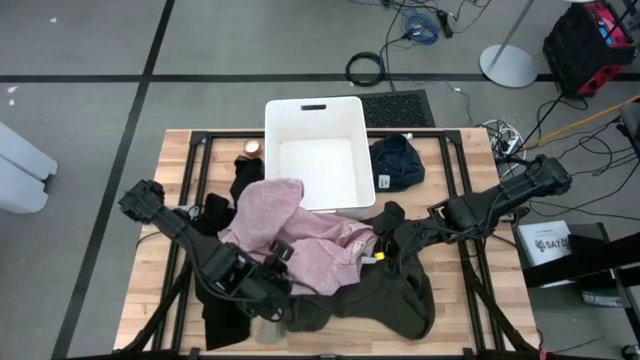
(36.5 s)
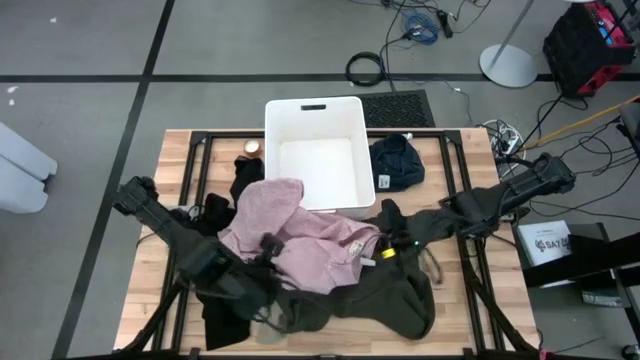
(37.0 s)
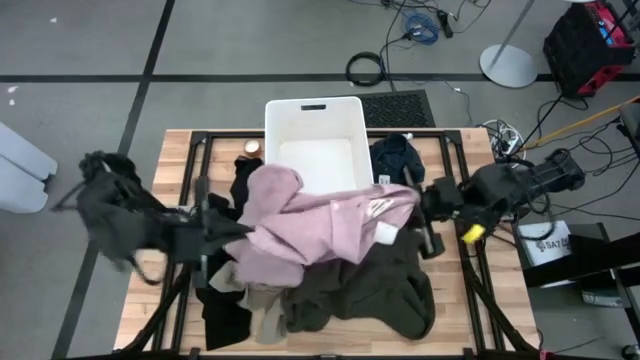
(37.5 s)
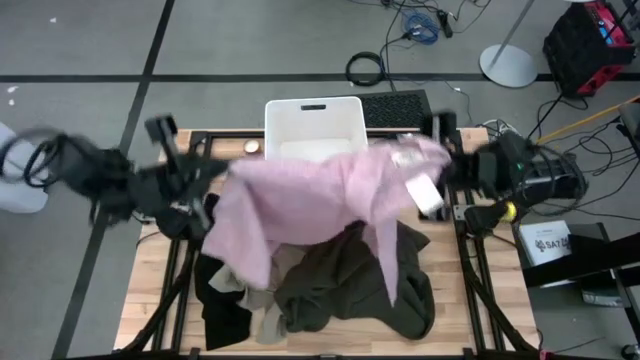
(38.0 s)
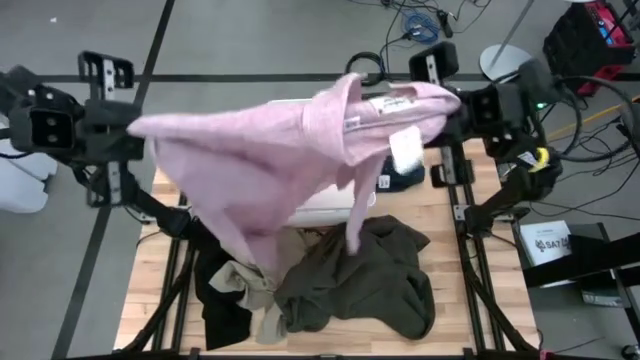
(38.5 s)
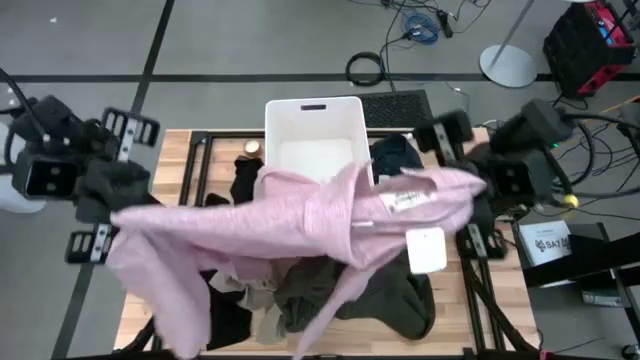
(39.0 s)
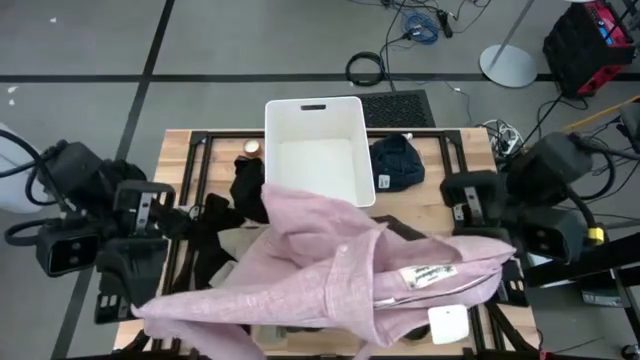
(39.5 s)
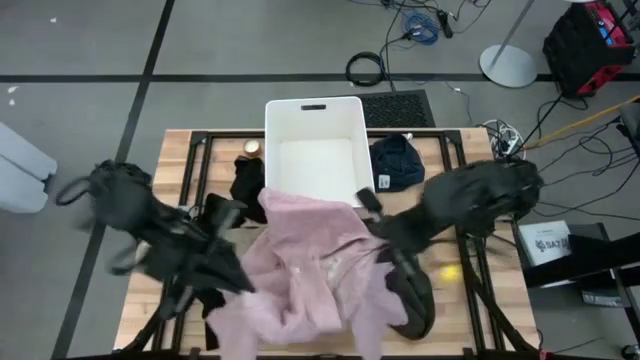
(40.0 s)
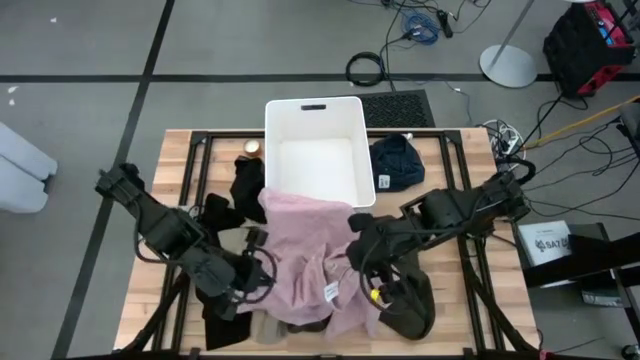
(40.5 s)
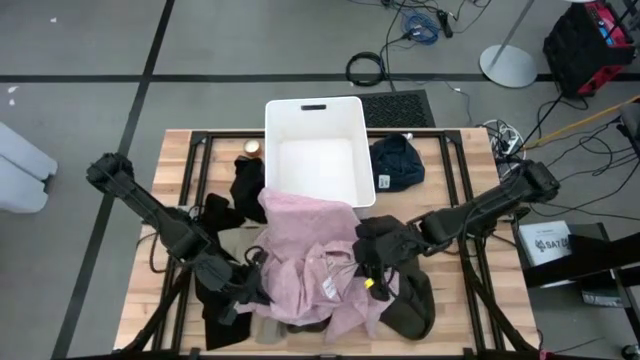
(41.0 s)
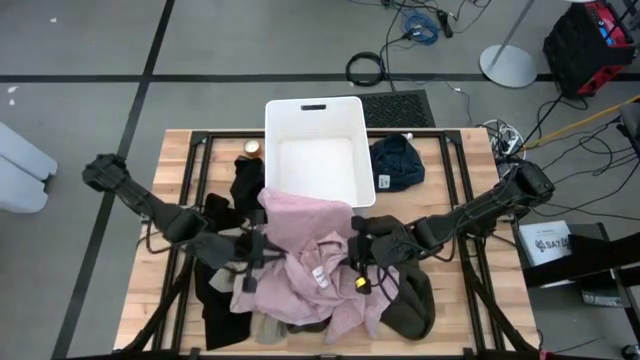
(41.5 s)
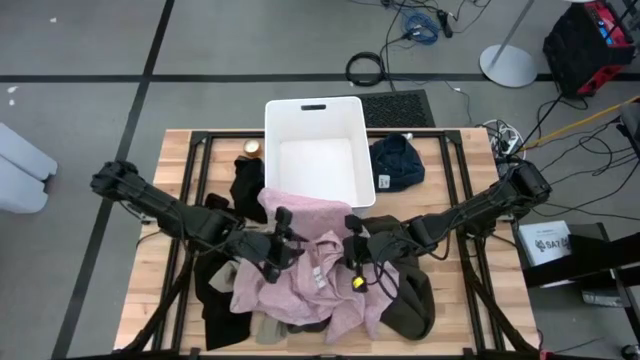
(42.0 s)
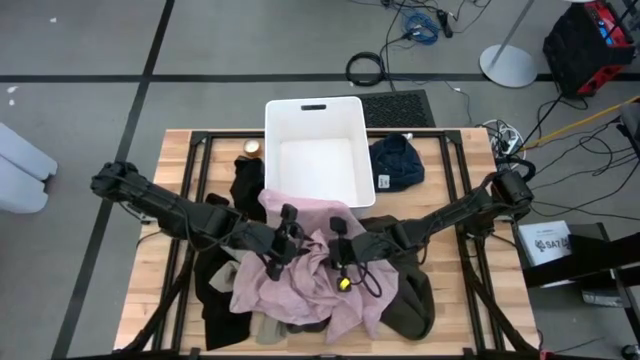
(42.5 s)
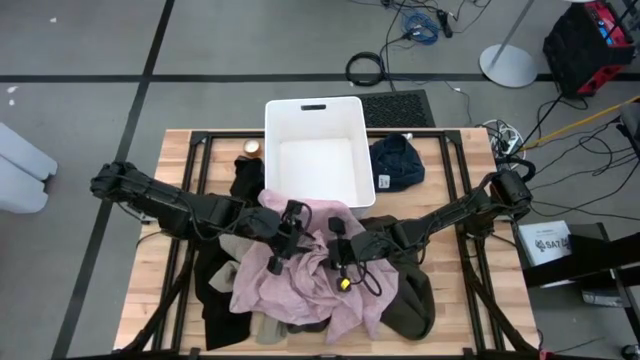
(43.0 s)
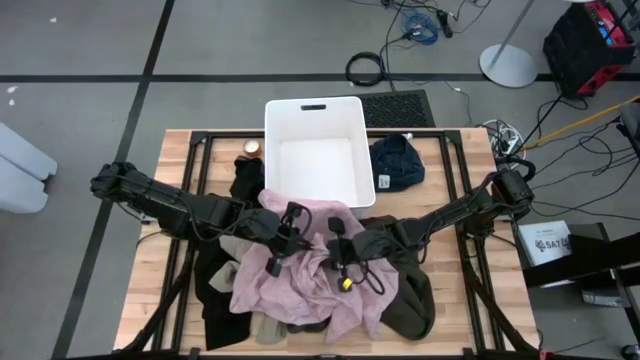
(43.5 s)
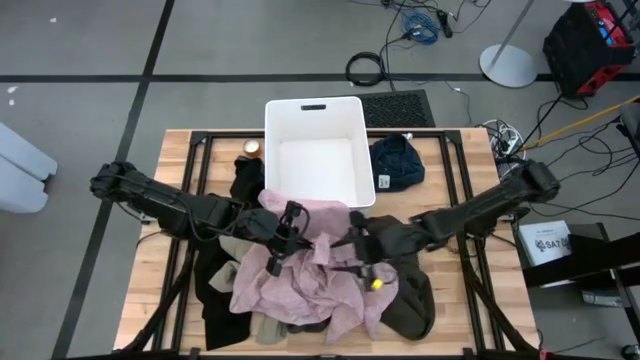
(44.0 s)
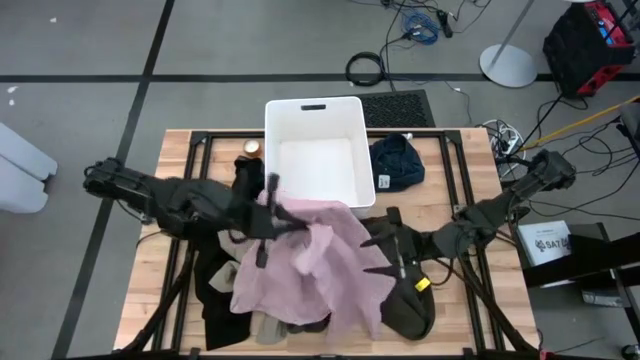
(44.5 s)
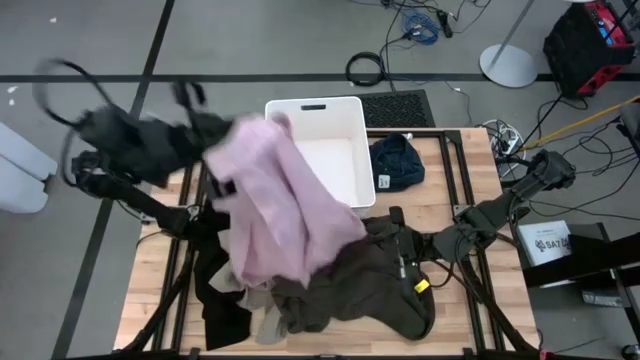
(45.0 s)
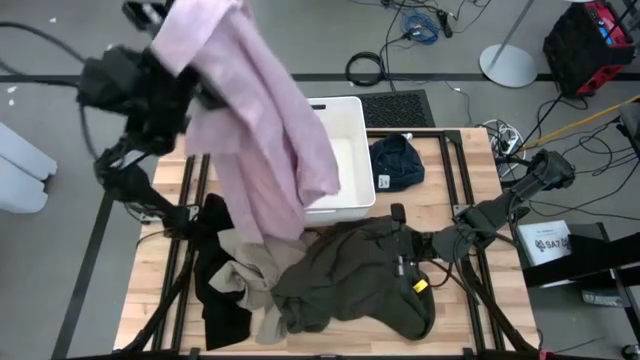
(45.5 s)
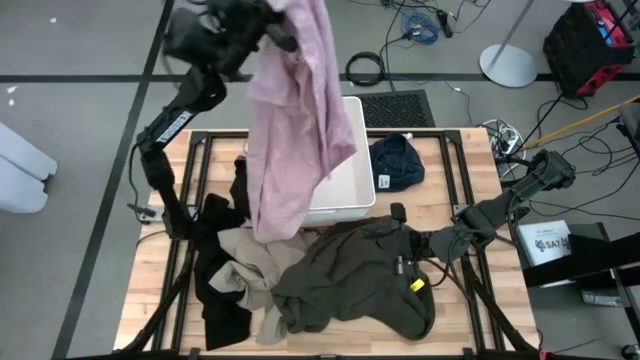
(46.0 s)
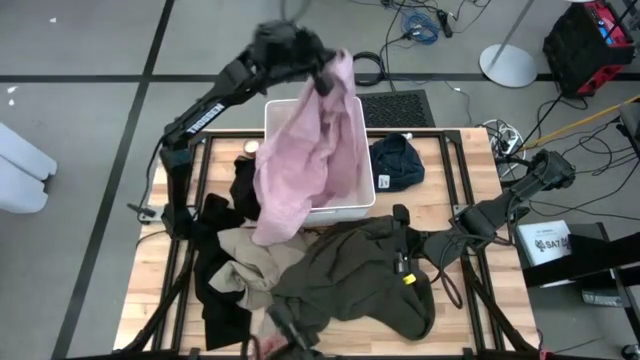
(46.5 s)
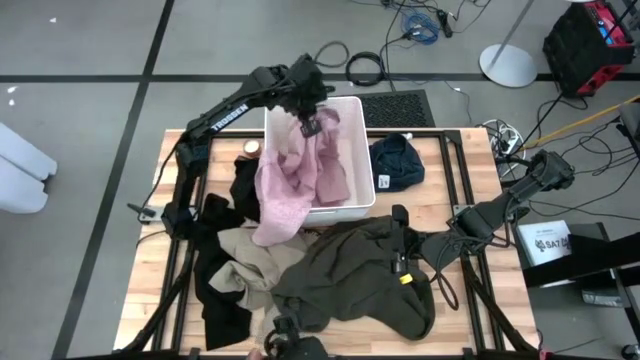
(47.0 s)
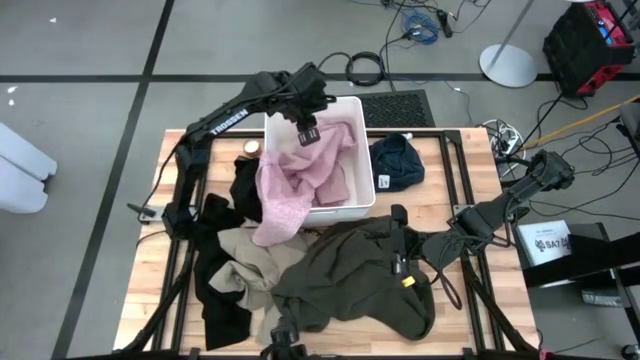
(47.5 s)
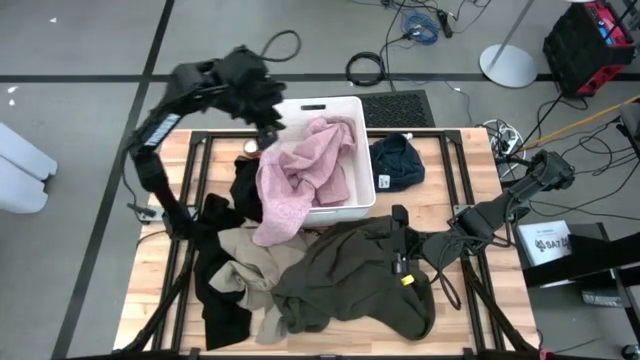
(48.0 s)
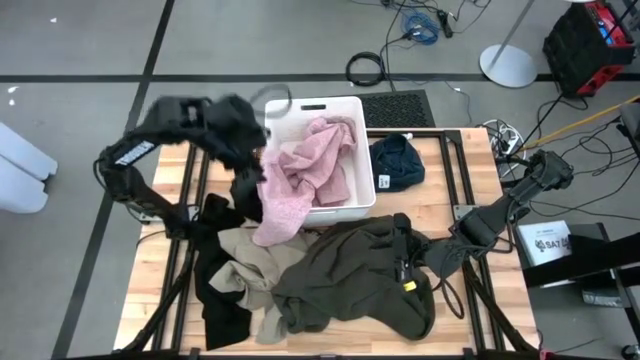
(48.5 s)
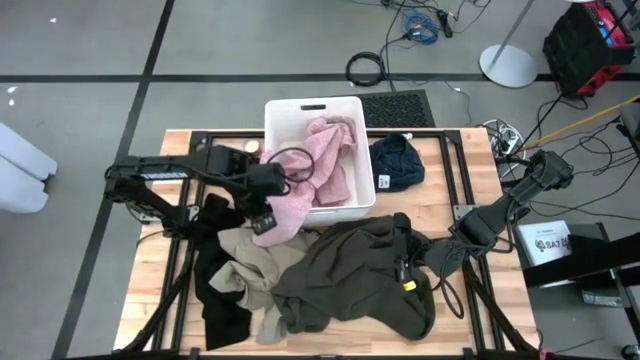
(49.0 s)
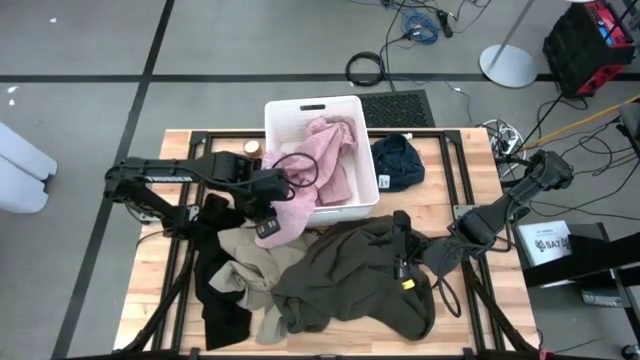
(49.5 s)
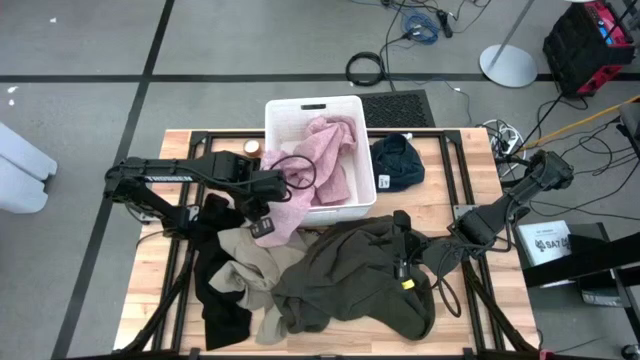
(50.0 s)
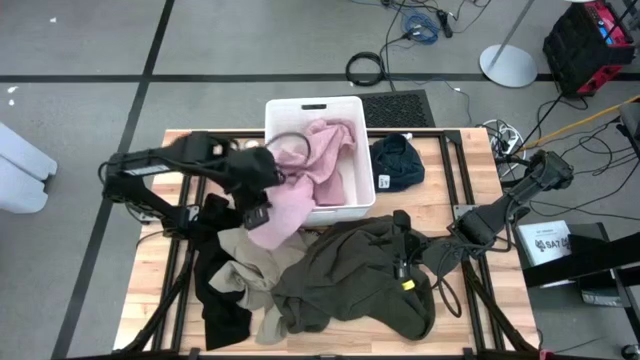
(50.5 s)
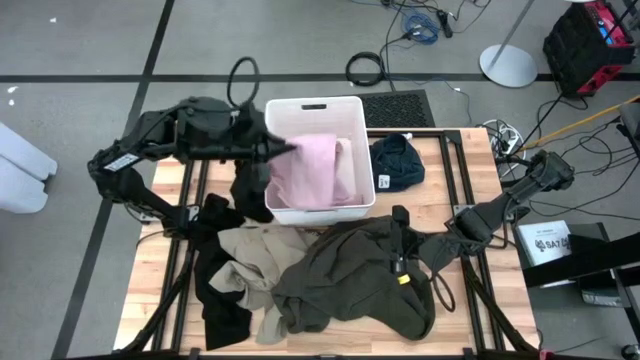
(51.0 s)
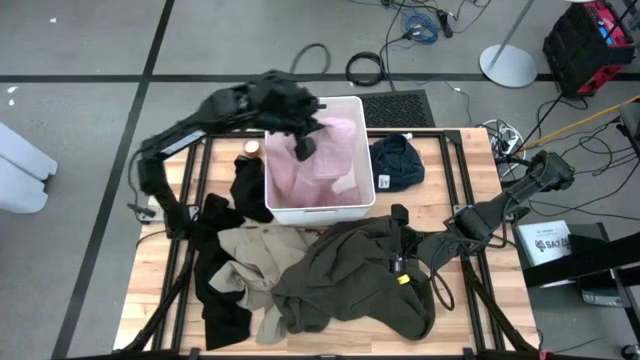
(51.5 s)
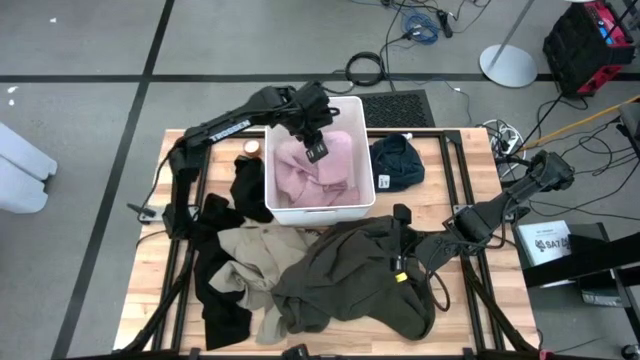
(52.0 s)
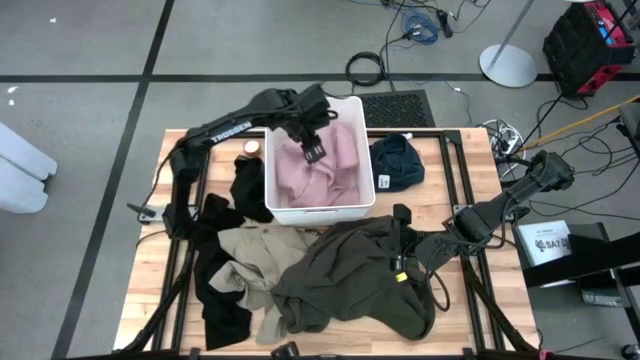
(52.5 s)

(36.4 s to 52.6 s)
Task: Fold laundry
Put the pink polo into the white laundry bin

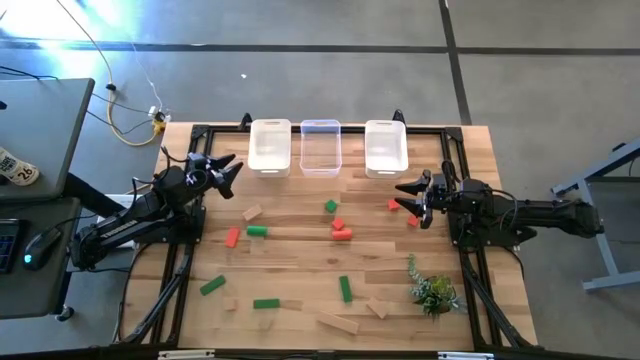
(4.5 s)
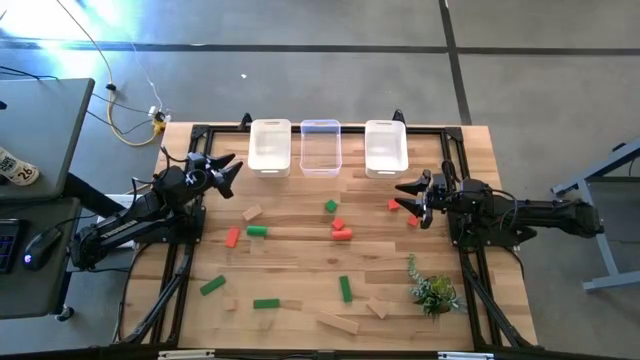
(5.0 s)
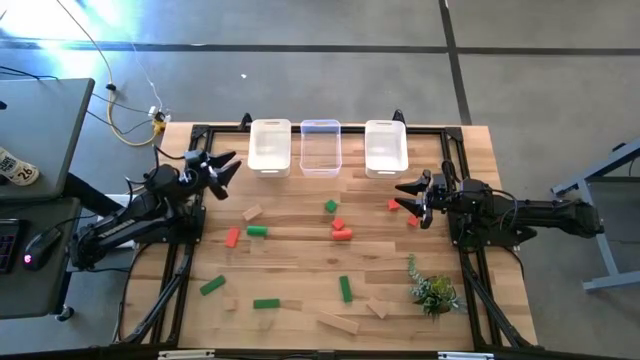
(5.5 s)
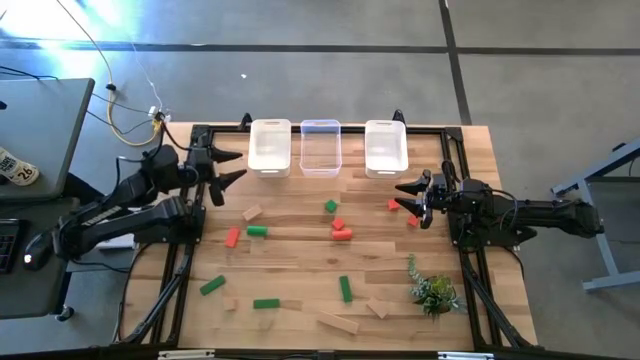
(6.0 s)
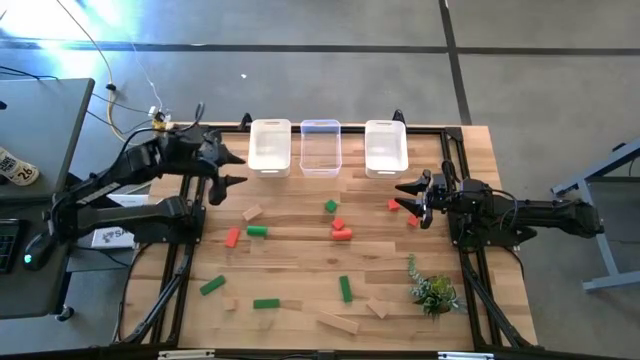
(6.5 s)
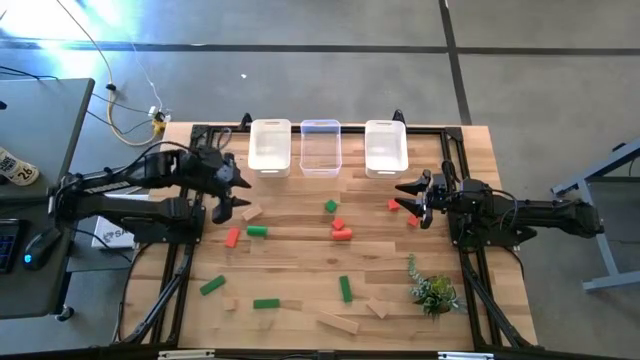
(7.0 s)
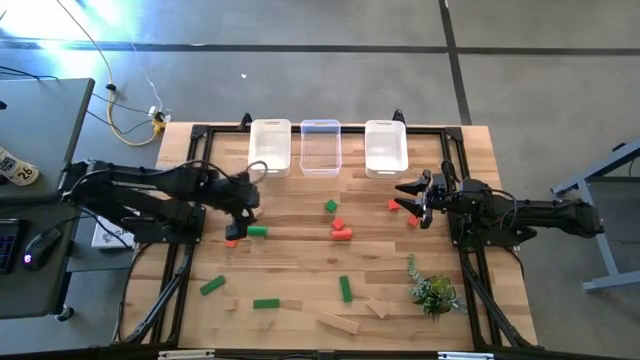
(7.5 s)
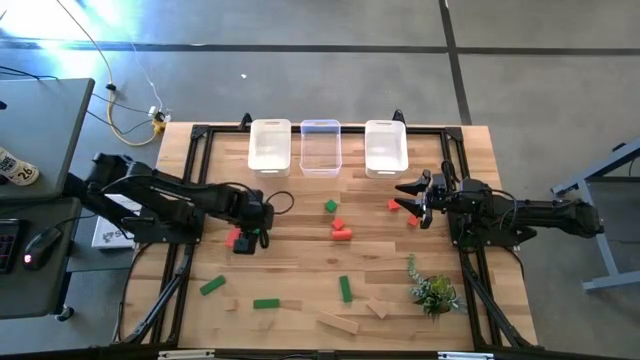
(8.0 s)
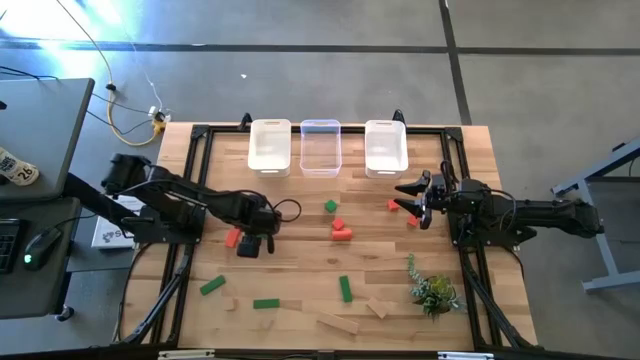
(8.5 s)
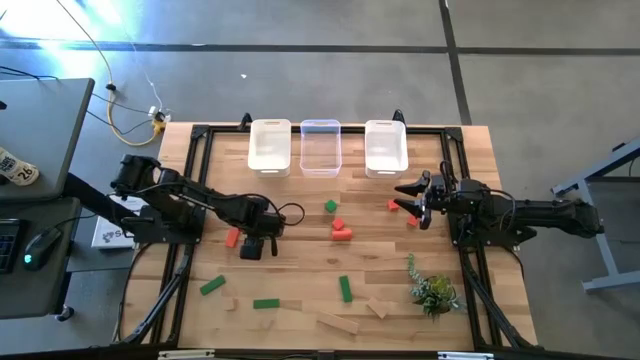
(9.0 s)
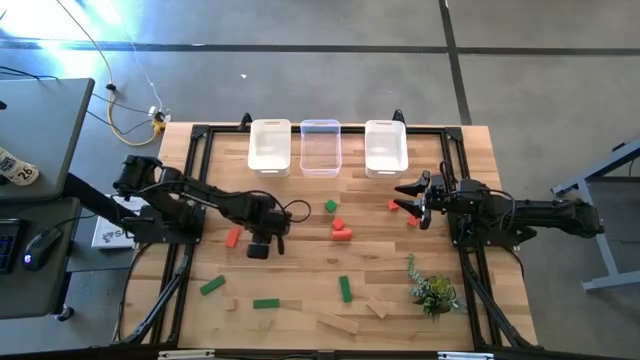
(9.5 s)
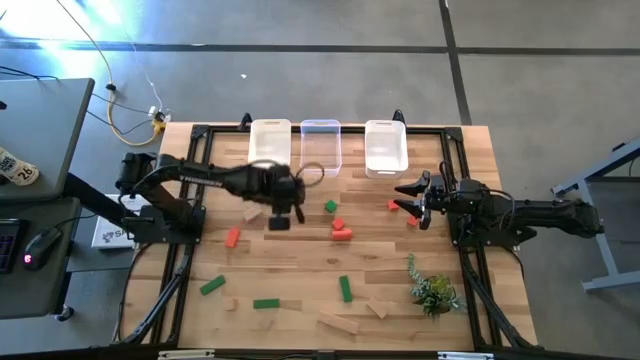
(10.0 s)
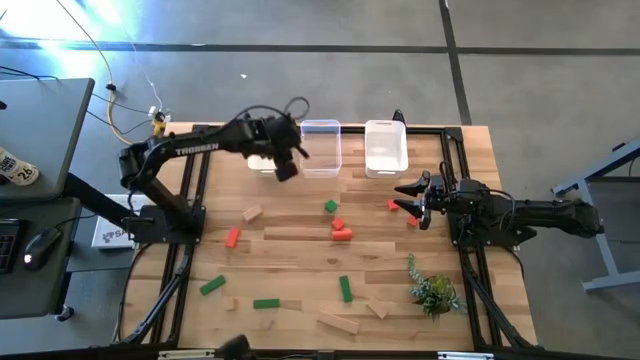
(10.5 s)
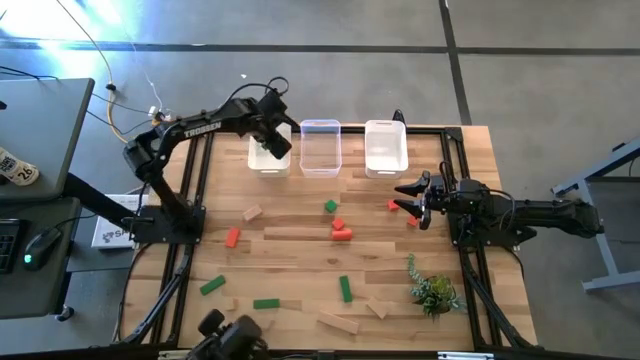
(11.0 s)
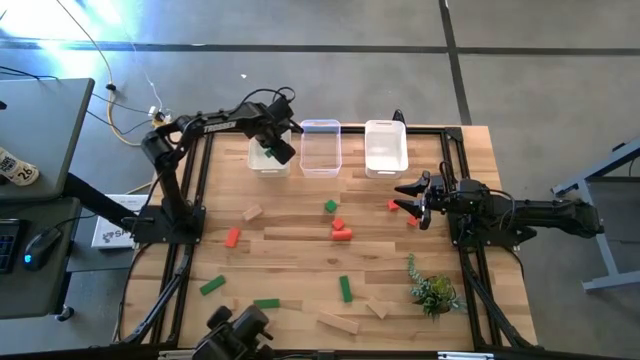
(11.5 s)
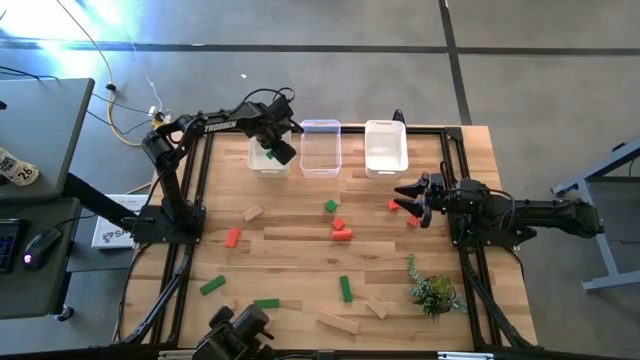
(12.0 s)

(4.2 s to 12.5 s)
Task: Sort & place blocks by color
Put the green block into the left white bin
